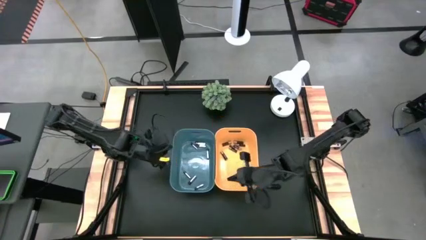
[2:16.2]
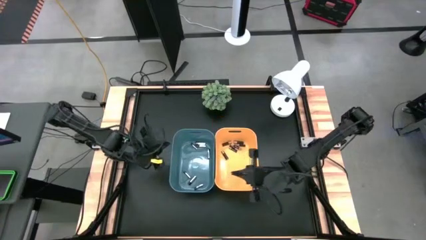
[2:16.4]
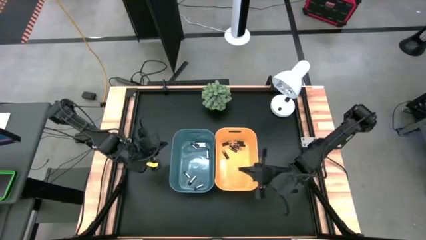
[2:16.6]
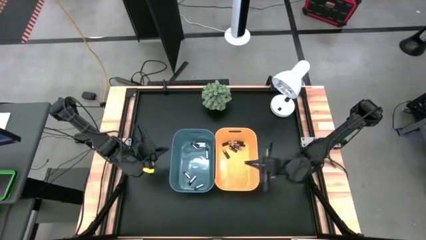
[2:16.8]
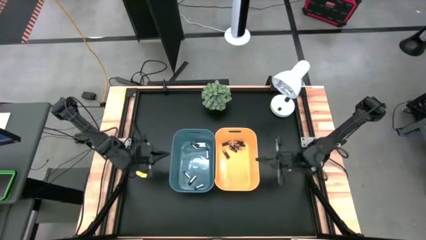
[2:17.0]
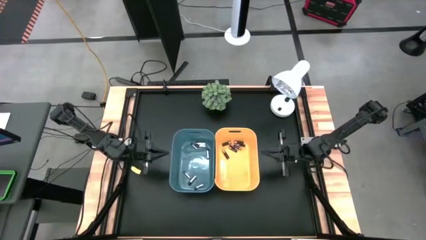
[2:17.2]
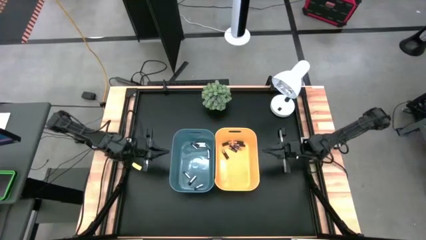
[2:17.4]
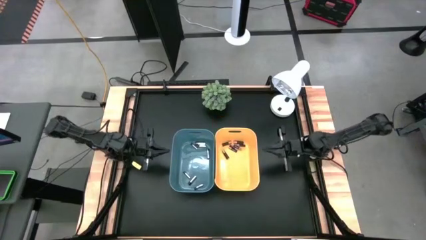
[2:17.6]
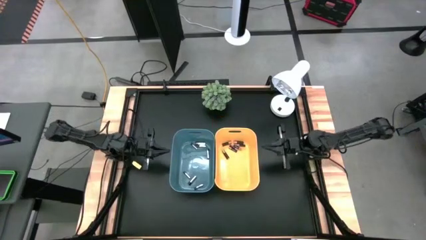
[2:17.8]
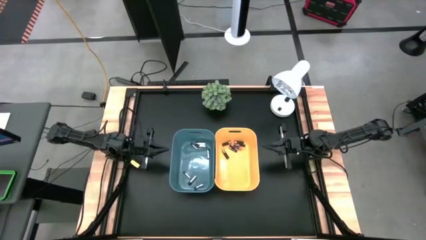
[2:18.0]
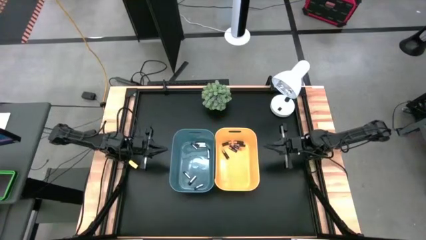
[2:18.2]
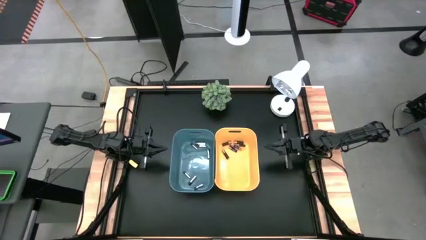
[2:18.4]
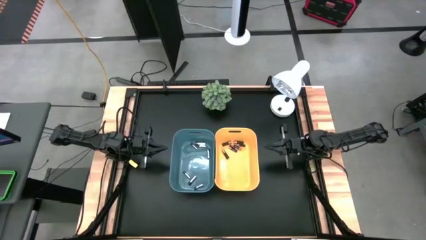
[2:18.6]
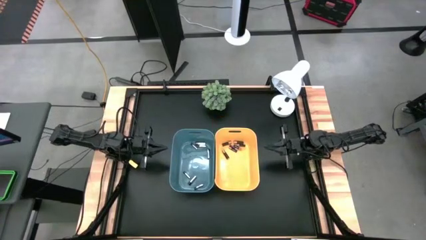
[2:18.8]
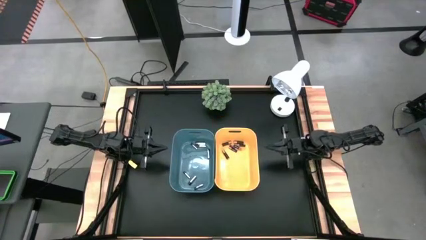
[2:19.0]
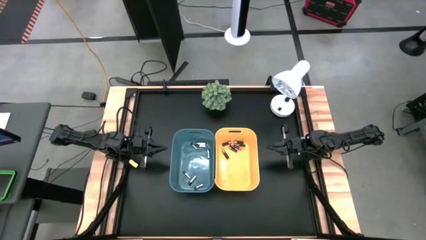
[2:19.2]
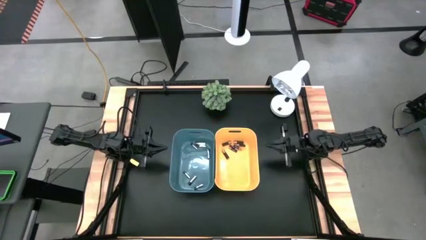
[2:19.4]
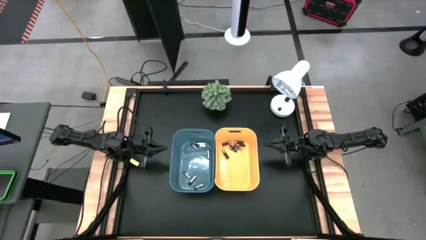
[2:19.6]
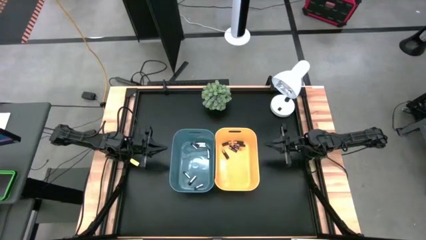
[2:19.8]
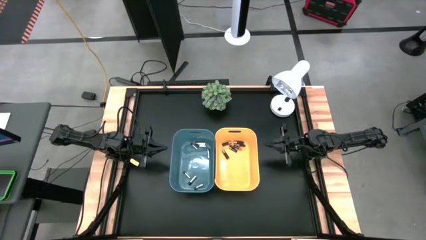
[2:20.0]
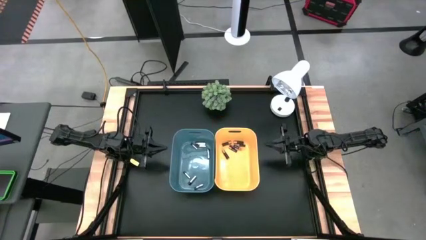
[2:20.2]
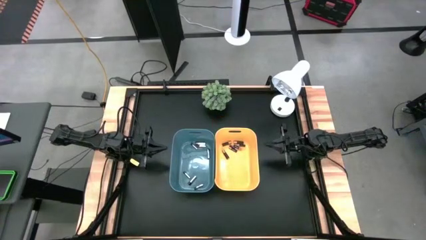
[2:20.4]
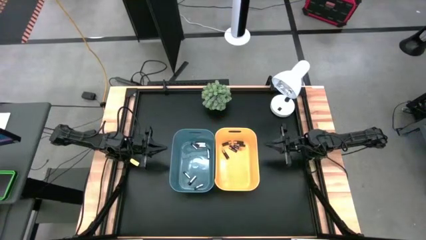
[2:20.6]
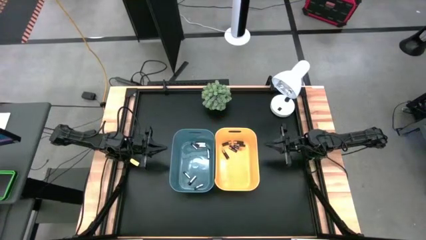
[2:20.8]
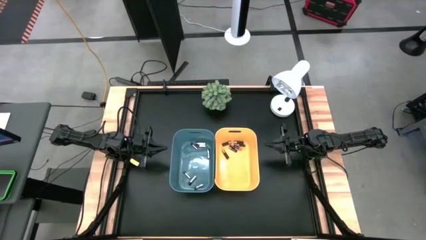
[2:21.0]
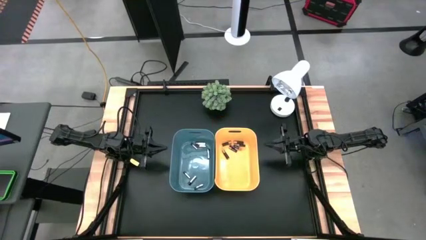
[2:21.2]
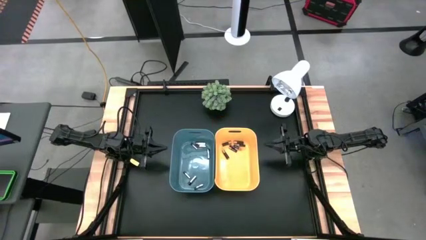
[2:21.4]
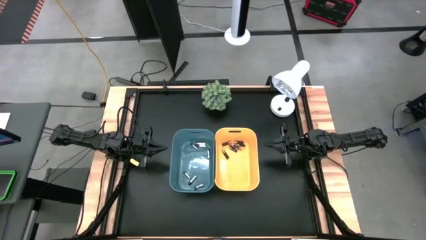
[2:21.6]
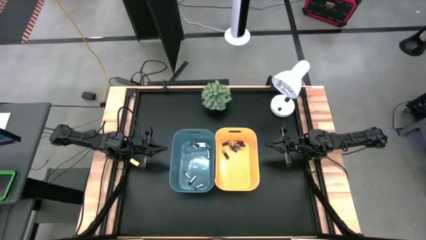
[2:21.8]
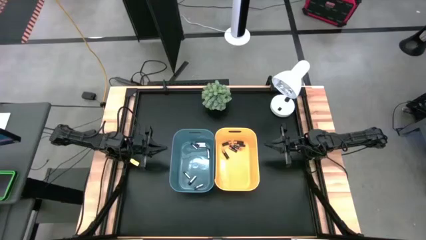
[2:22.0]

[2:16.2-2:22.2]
Task: Sort batteries
Return to Home Position

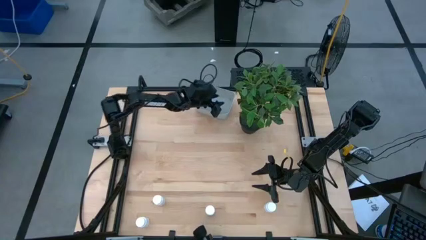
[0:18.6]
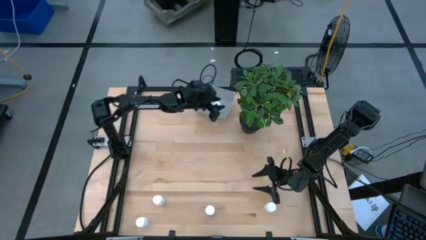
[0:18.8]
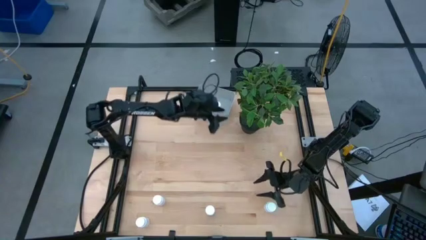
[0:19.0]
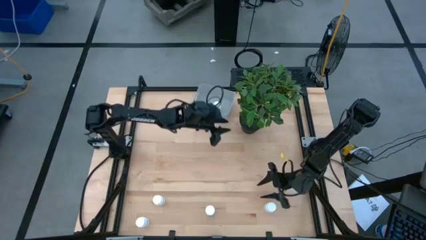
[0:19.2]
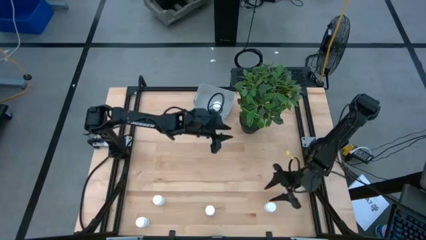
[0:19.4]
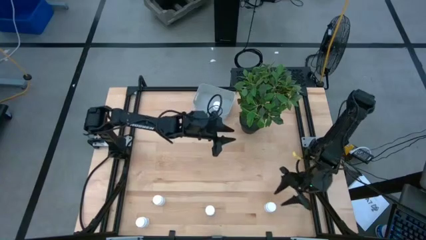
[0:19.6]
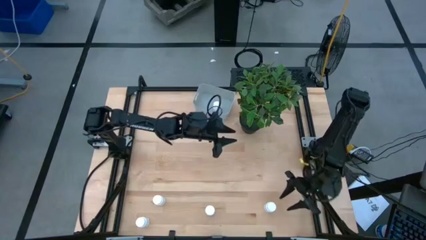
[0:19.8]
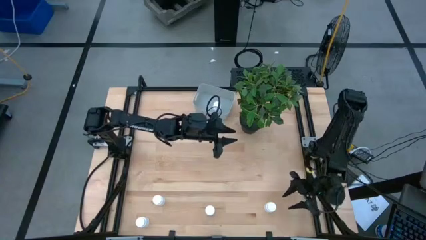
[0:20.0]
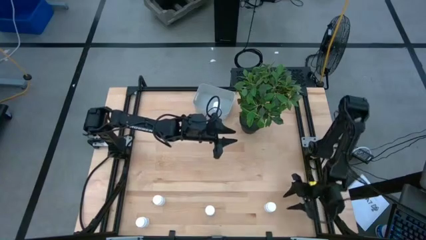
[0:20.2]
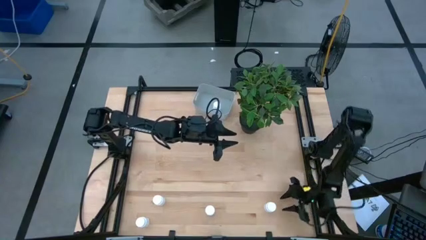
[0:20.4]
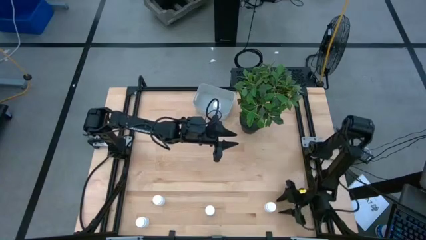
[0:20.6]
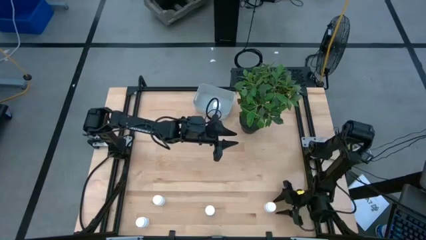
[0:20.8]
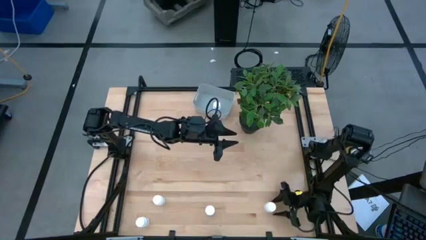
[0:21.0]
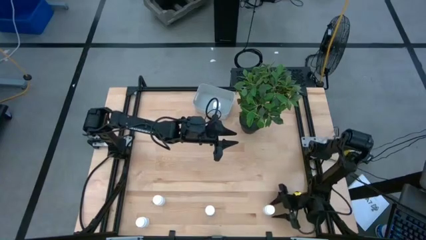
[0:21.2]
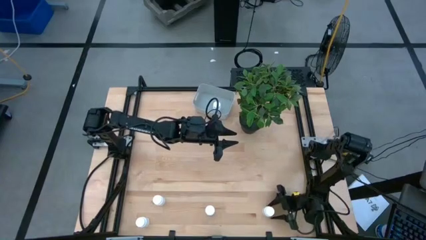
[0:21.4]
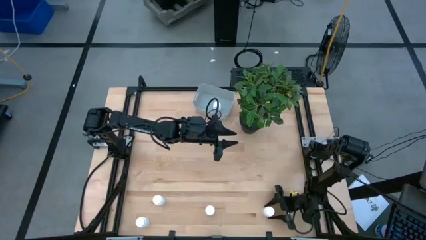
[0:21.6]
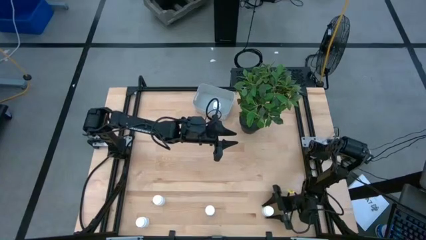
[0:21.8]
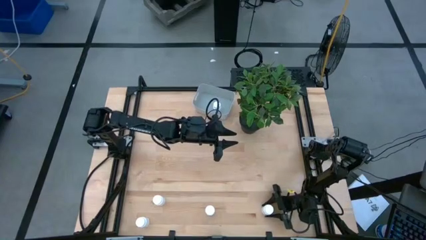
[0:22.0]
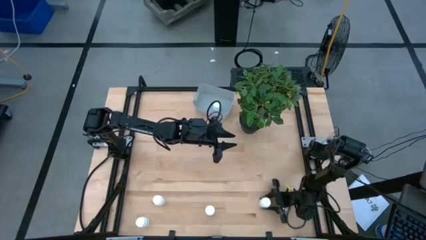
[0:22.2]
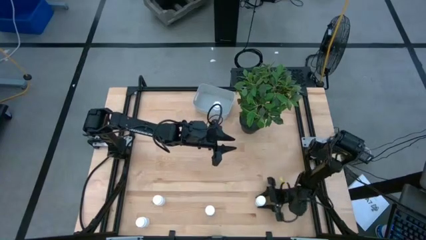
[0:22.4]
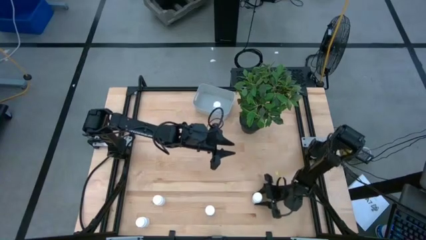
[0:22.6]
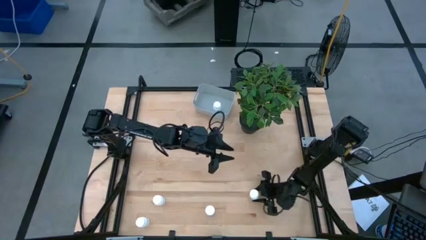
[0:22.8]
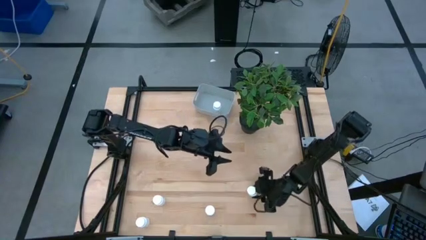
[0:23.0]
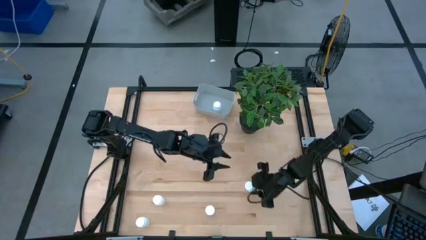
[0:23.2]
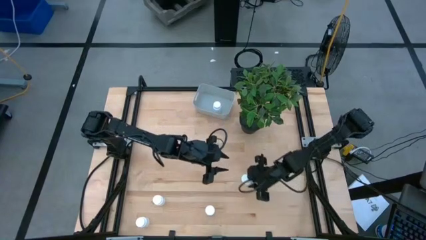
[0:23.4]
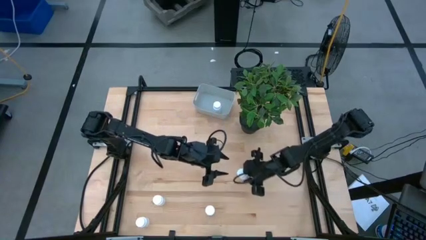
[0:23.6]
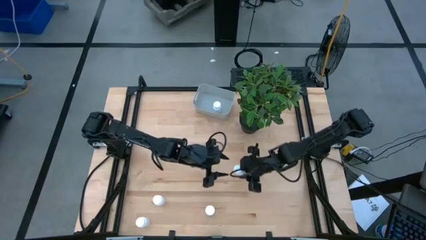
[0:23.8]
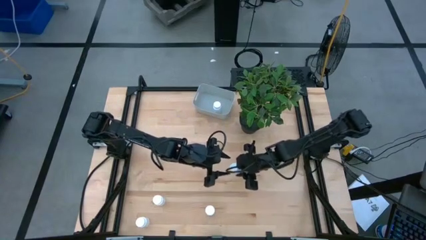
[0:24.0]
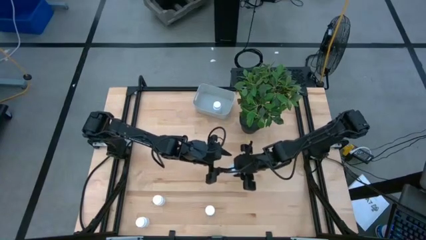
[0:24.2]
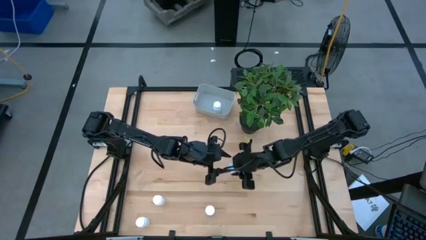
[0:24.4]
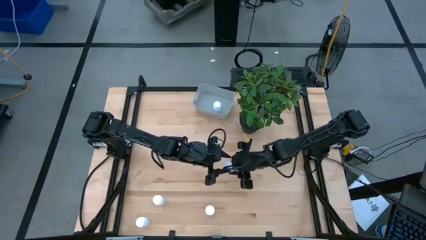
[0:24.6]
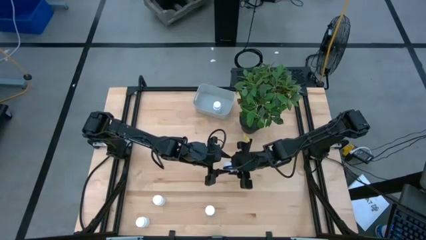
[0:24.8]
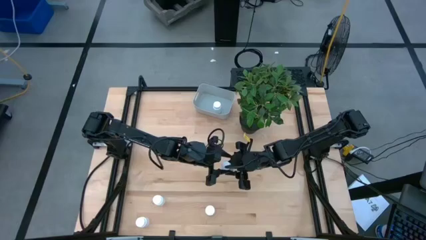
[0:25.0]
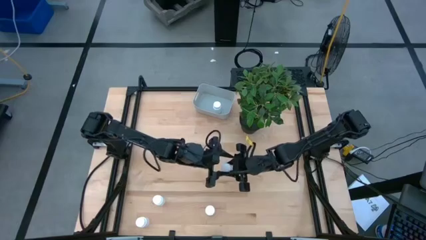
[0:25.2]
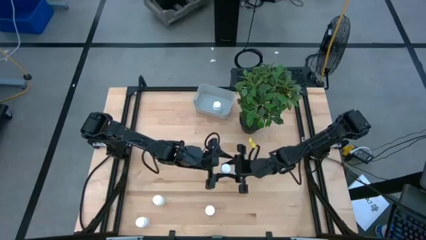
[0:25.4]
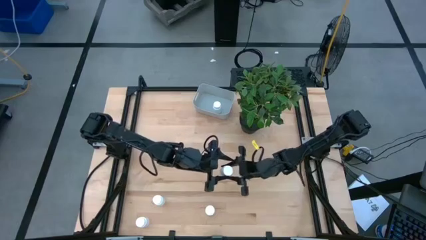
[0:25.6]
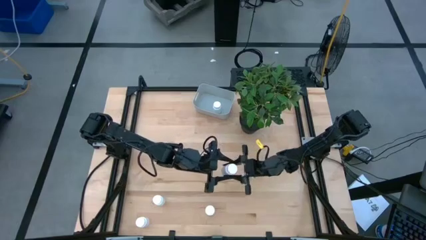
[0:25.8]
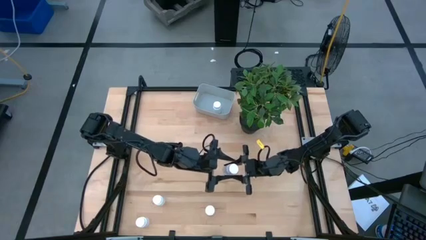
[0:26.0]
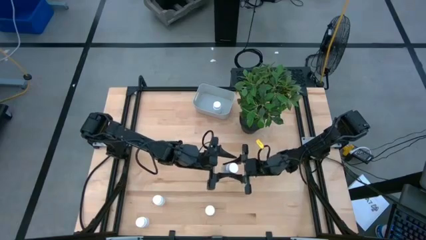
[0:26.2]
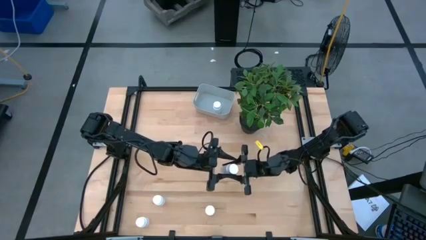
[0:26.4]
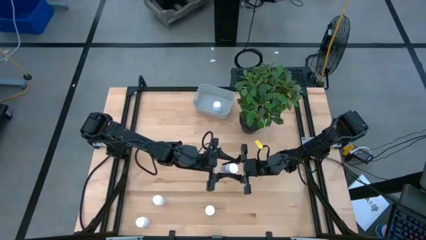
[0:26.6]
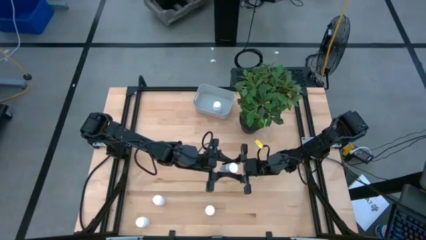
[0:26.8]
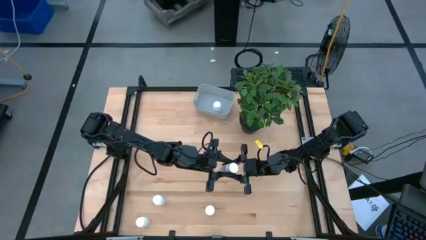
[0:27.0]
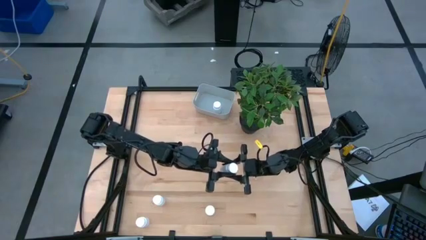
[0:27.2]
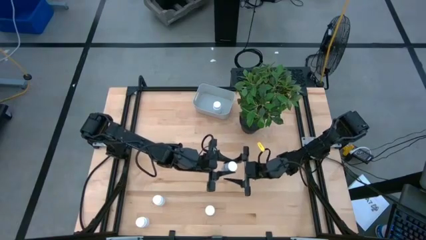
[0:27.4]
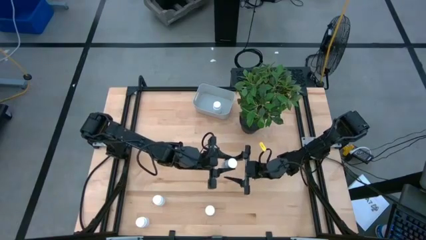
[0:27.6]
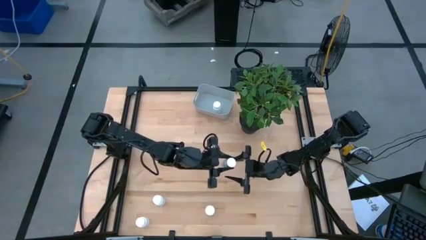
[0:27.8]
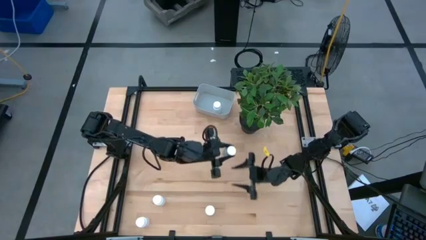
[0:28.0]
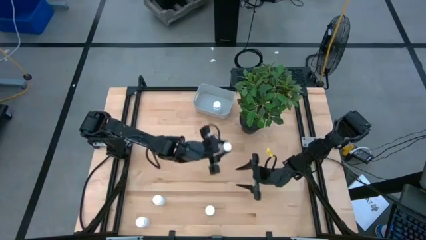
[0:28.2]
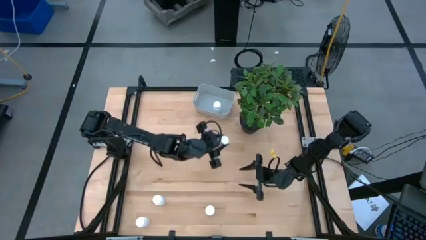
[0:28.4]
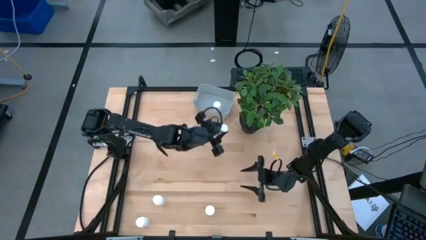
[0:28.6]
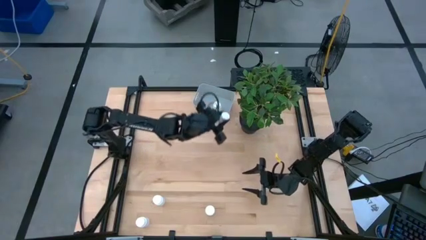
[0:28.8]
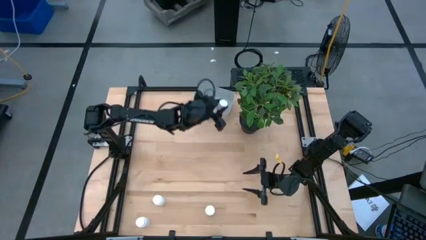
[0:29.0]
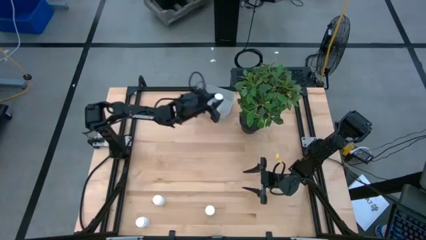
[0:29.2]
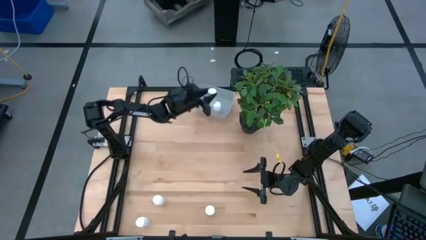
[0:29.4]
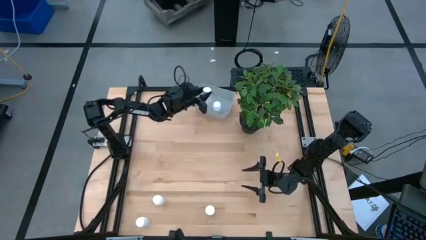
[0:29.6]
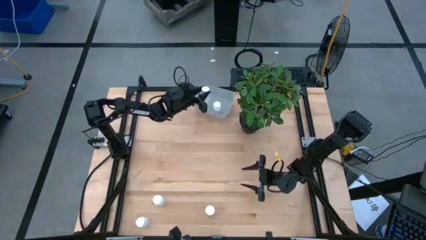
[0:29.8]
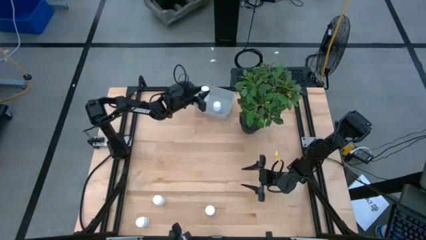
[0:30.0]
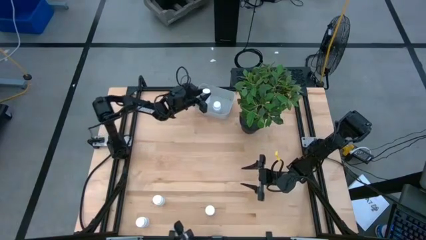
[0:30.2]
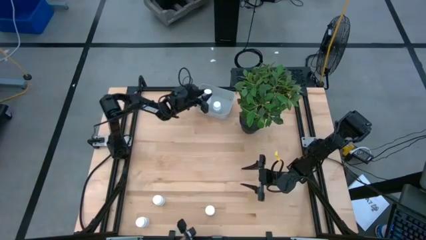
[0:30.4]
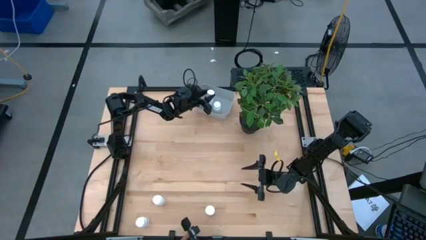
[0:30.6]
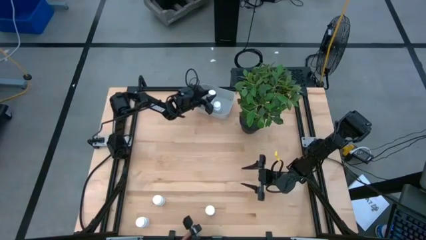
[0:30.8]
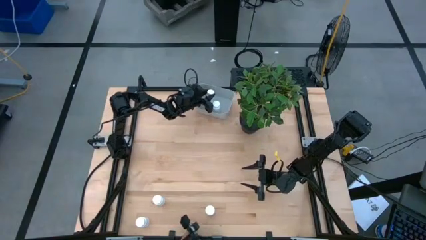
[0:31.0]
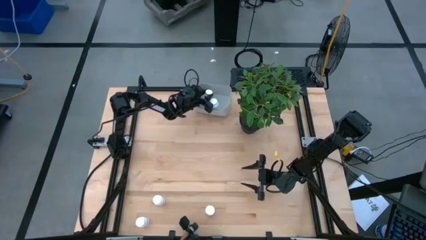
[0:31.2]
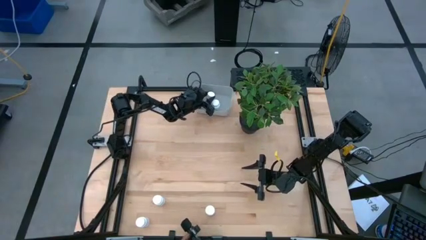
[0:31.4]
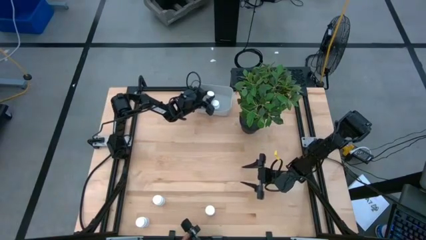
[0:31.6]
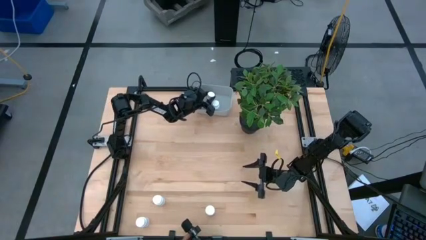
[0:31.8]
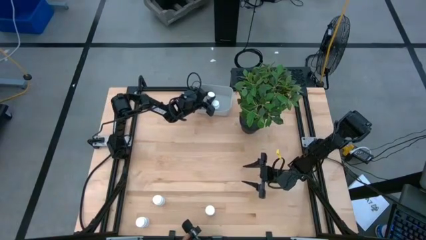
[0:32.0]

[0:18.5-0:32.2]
Task: Pick and place pill bottles into a basket
Put the white pill bottle into the gray bin
